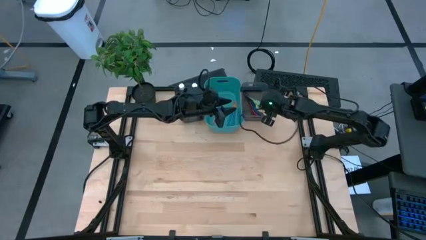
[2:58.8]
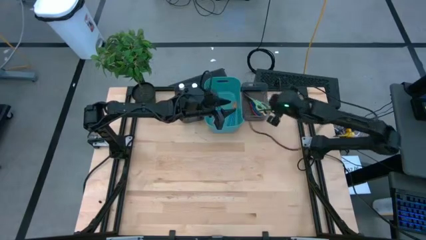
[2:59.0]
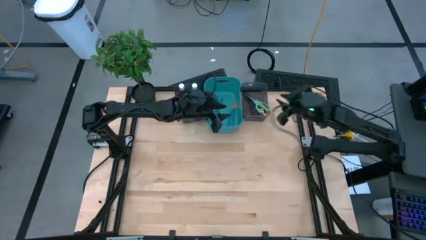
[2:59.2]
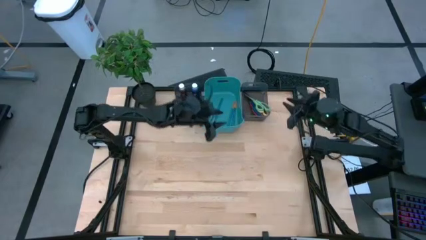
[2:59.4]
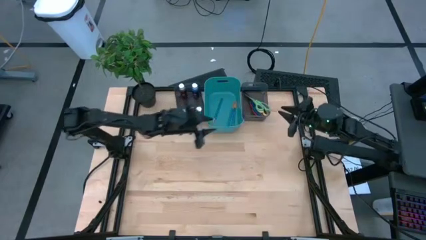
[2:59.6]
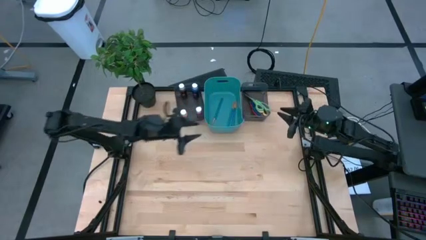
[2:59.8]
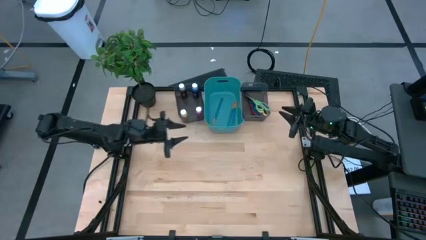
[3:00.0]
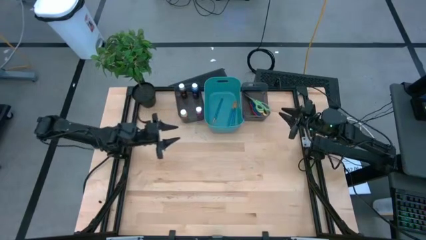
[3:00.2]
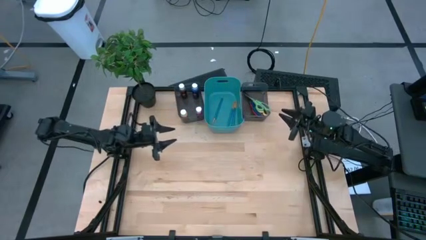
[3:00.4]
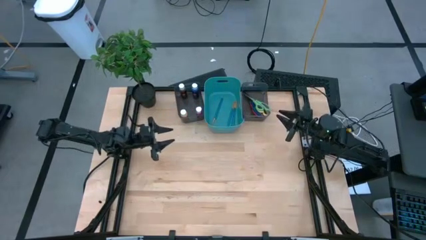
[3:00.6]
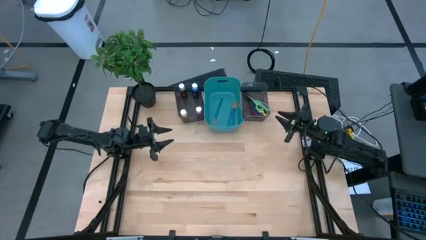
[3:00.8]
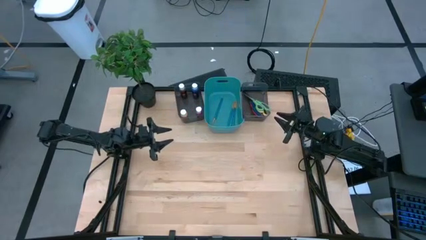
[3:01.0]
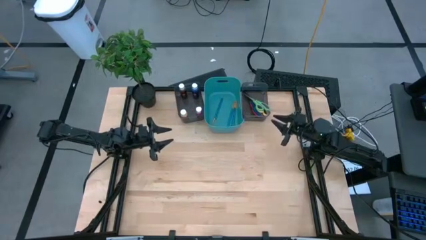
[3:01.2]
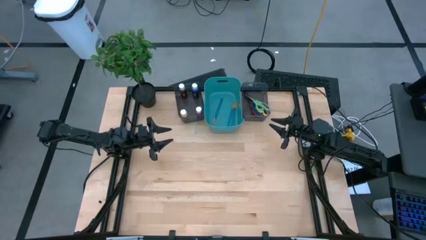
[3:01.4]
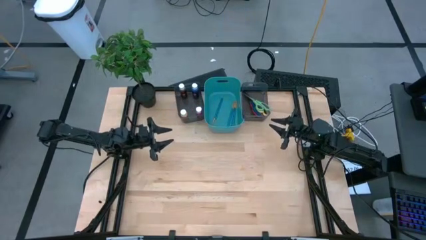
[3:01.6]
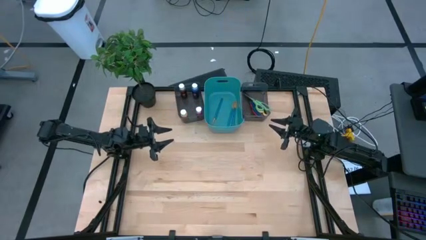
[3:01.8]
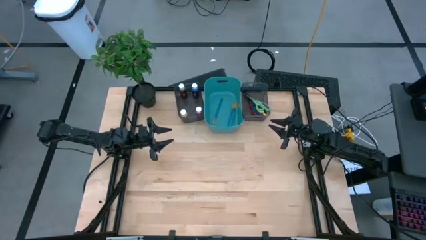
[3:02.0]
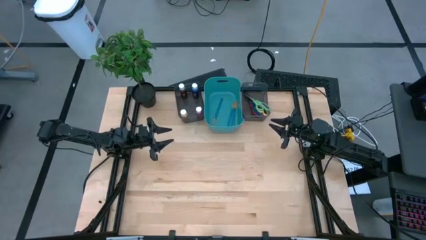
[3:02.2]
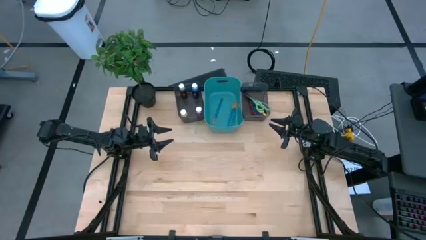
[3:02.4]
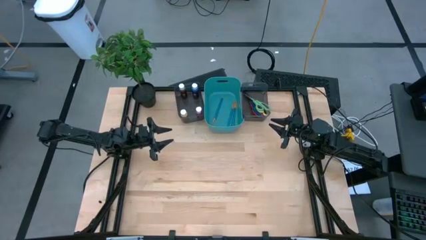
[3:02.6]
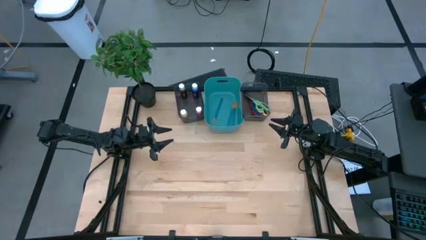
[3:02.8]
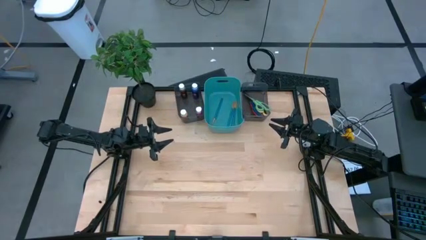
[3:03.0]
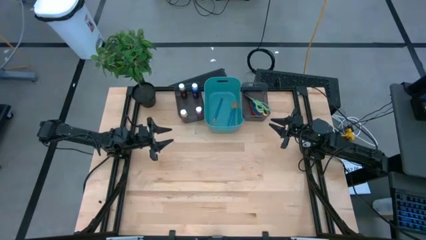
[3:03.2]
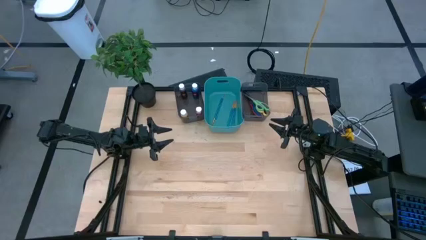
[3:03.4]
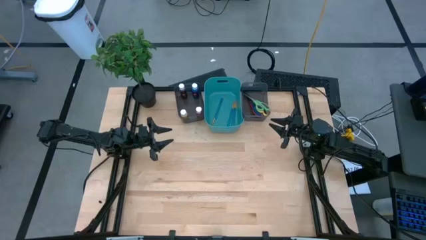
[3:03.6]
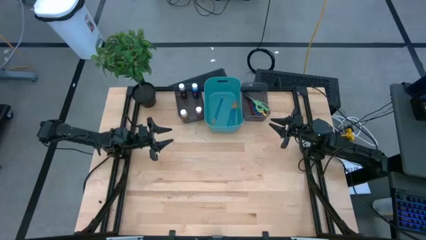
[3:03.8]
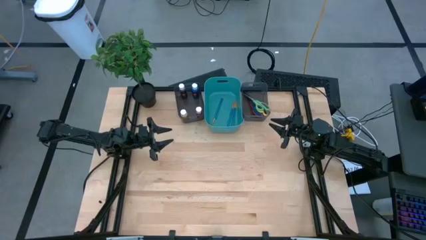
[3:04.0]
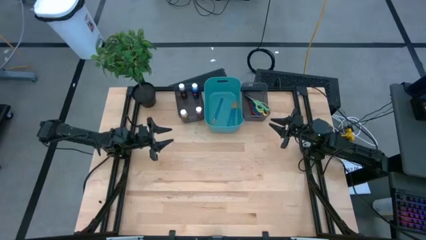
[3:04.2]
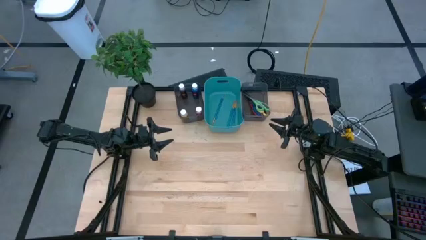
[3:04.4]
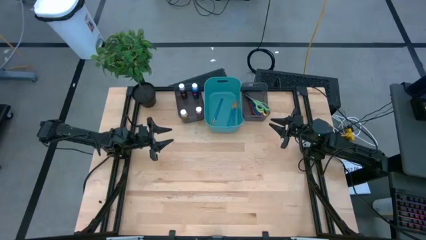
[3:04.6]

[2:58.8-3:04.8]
Task: Pick & Place Paint Supplies
Return to Home Position

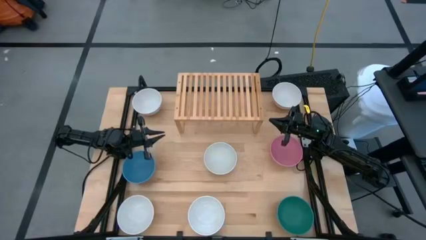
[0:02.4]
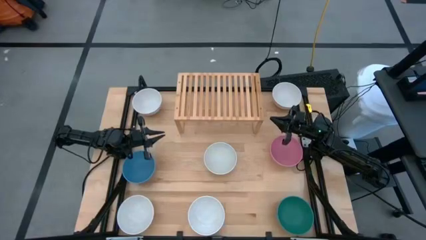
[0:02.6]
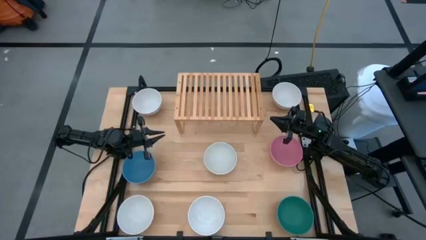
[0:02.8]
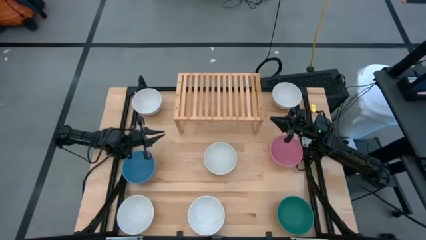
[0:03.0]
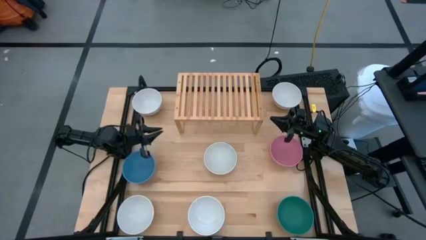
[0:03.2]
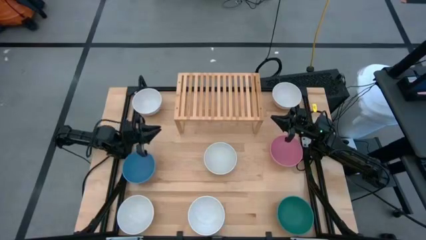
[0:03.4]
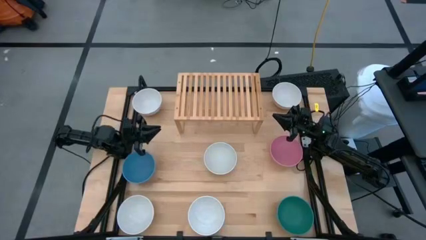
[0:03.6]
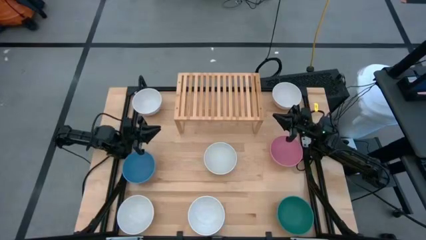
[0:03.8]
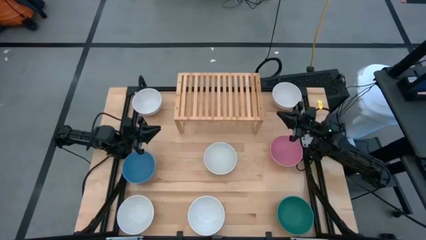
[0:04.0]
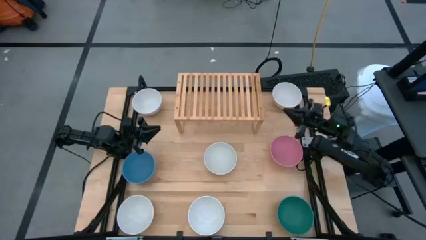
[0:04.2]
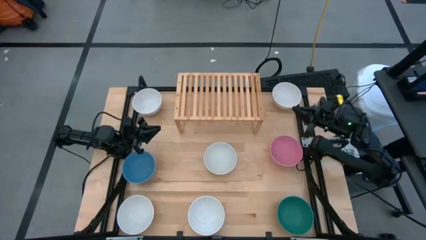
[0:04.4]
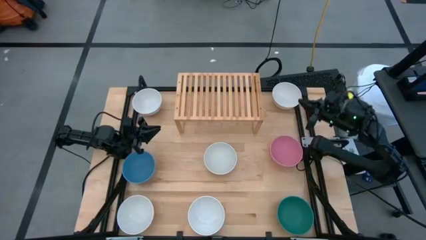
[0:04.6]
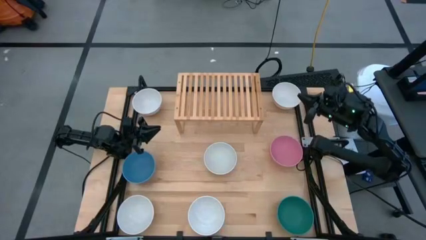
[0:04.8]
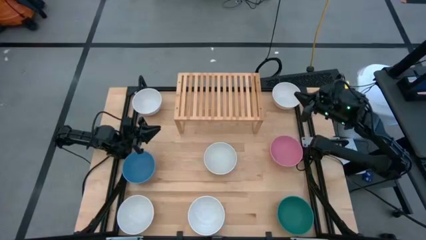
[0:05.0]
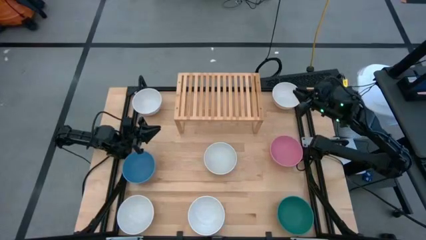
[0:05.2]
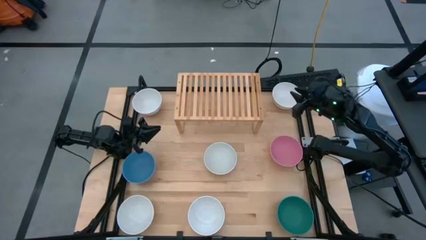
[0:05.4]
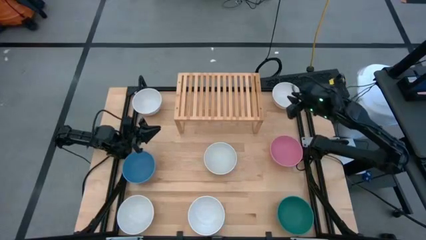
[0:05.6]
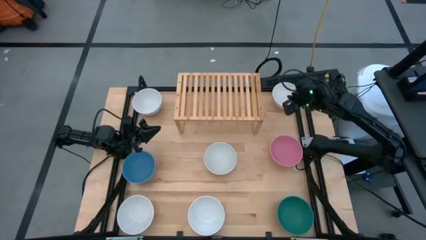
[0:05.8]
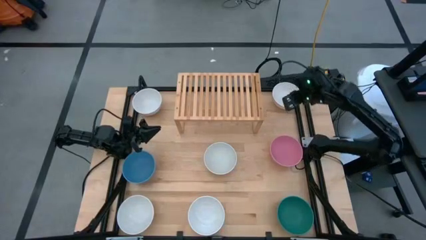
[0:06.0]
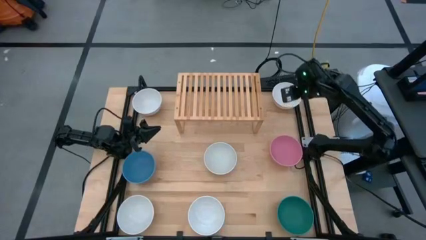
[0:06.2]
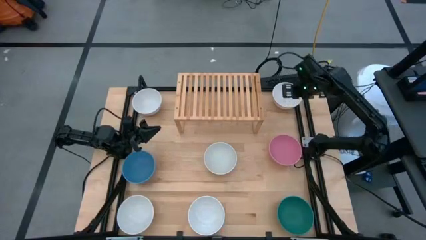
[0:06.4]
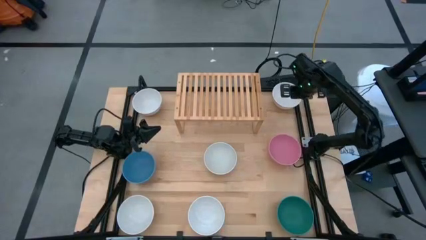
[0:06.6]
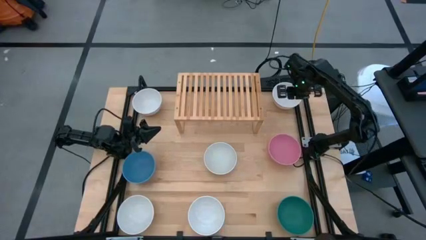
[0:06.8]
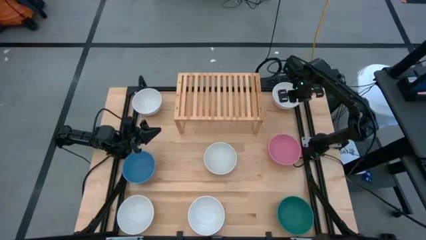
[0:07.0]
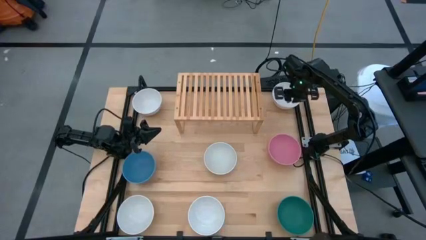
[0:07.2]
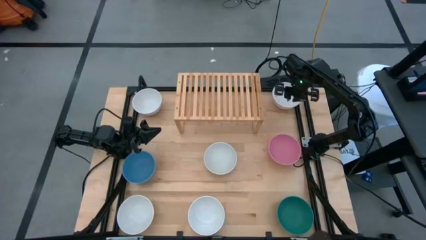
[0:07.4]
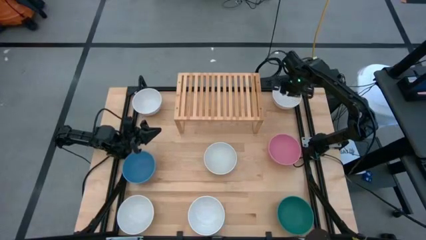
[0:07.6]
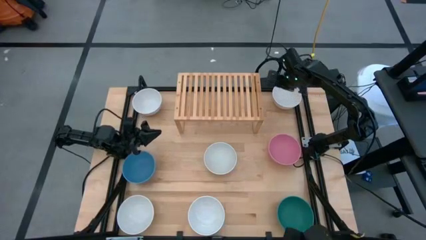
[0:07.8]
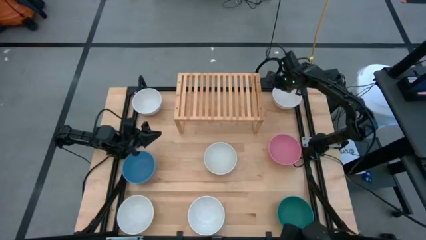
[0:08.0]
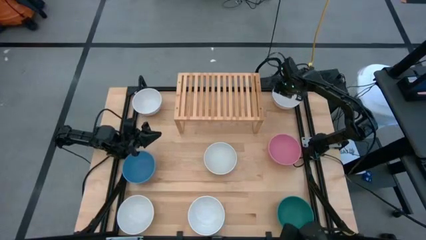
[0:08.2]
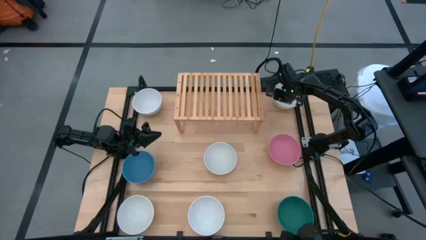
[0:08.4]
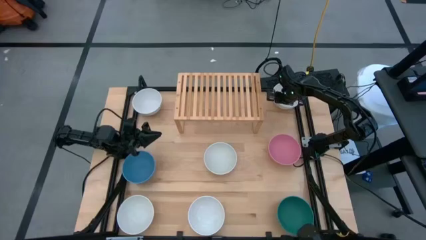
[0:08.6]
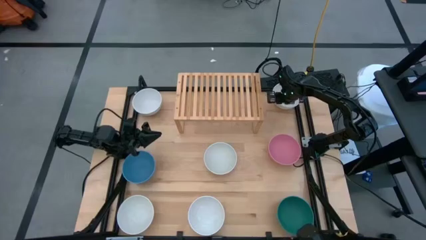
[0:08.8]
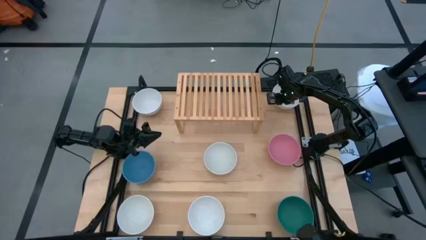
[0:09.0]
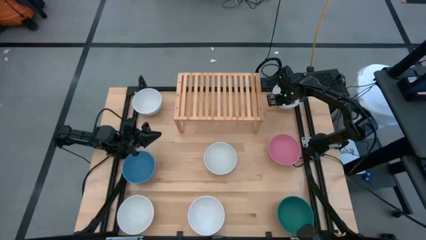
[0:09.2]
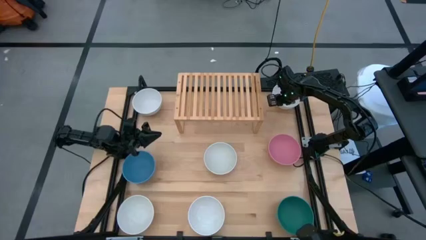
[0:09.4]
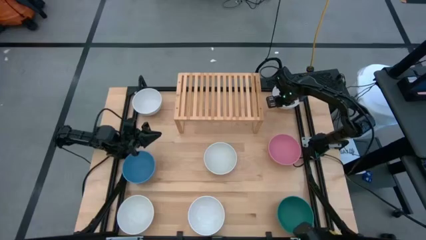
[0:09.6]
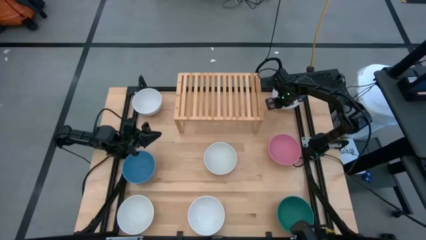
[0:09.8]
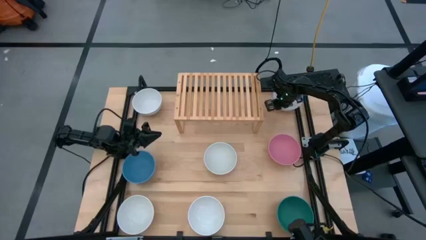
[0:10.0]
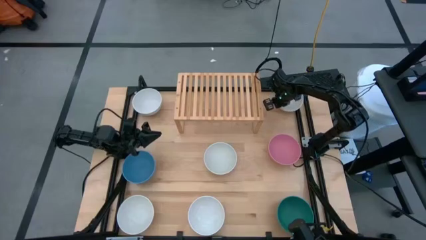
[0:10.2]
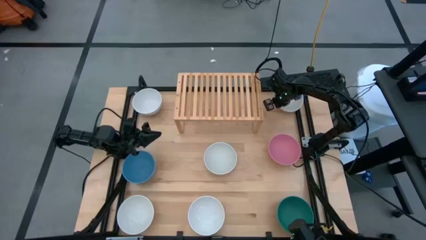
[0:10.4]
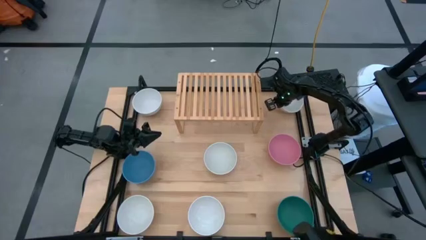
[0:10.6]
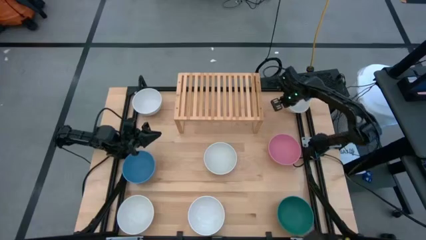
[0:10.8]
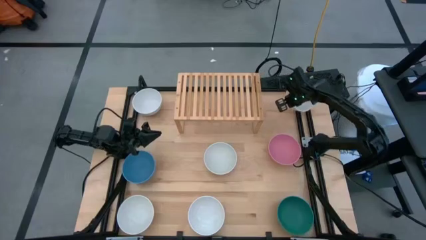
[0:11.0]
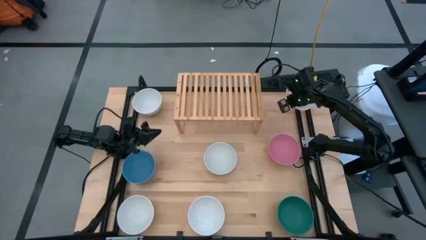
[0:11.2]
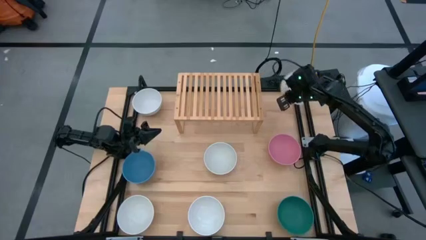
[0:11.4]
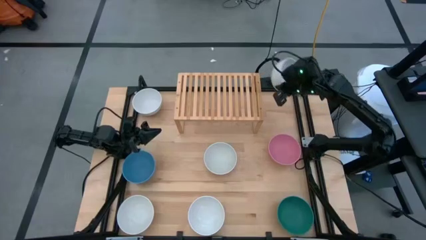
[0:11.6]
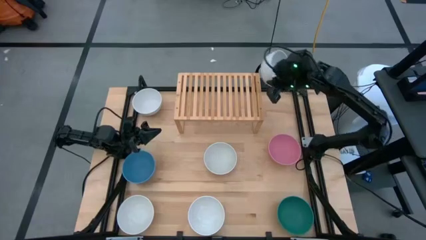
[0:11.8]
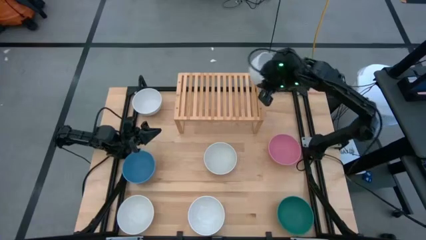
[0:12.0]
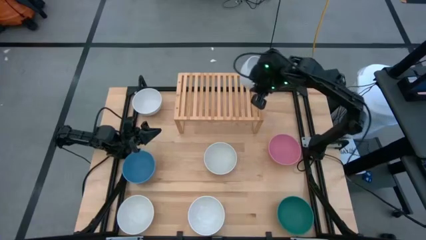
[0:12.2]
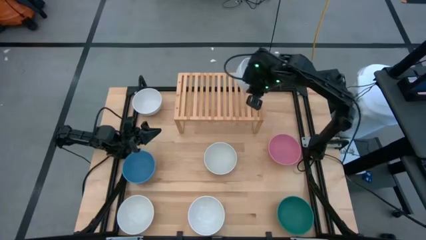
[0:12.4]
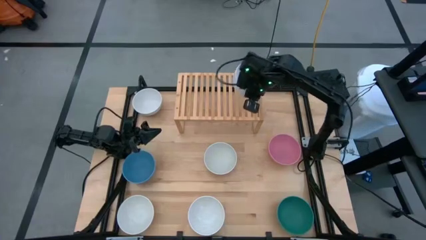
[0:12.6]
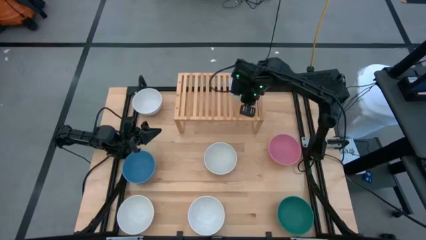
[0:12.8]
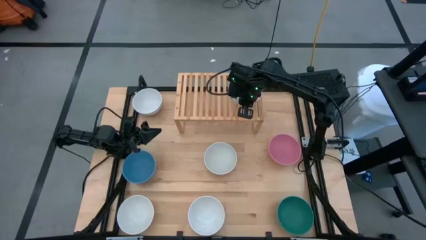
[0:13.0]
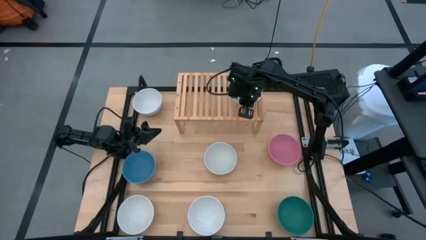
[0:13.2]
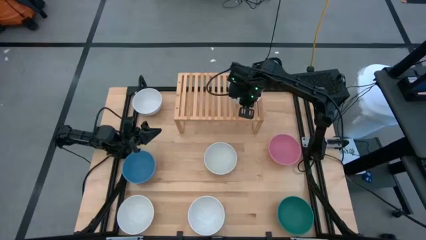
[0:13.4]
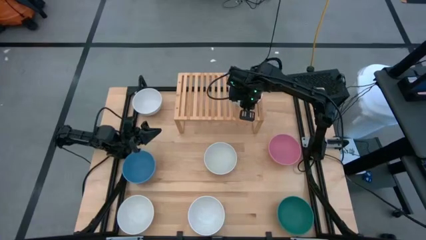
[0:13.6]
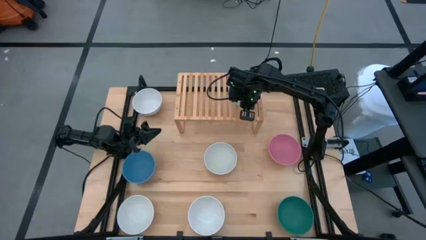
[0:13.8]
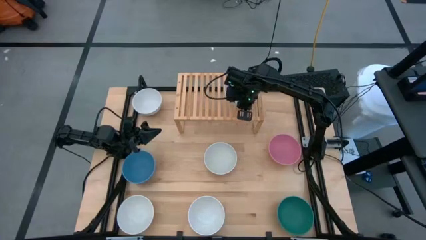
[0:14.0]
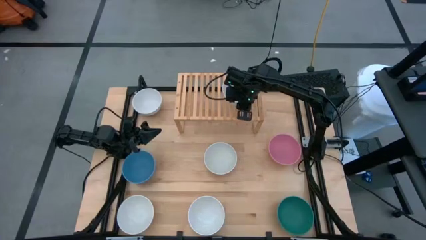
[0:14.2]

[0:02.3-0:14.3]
Task: Place and stack bowls onto a shelf
Put the white bowl on the shelf
